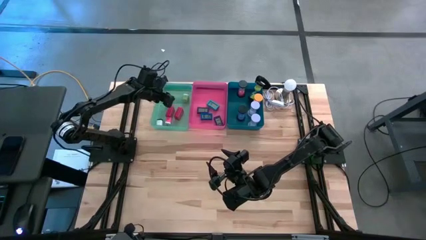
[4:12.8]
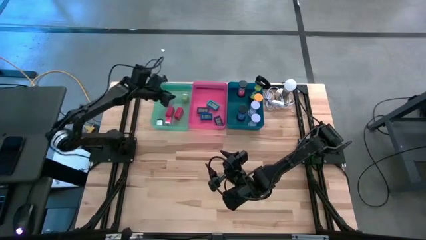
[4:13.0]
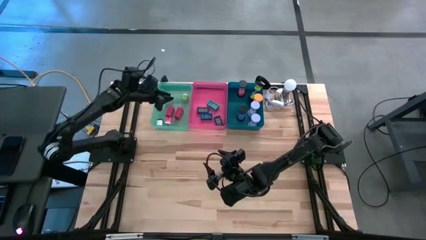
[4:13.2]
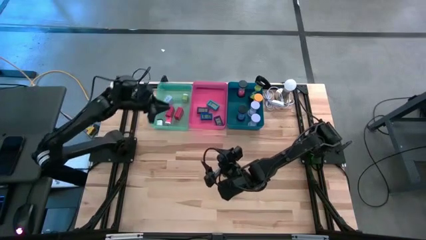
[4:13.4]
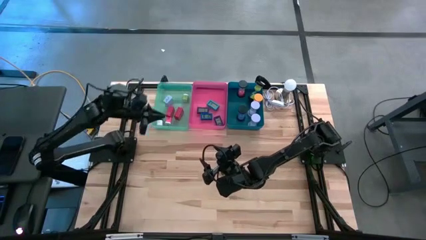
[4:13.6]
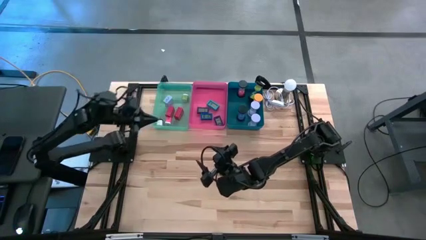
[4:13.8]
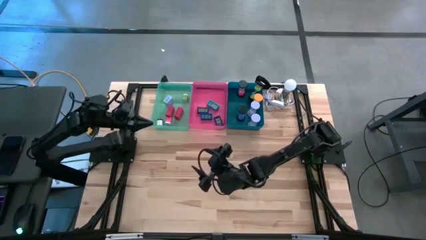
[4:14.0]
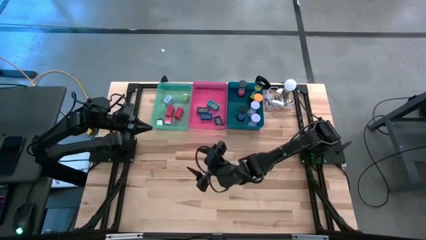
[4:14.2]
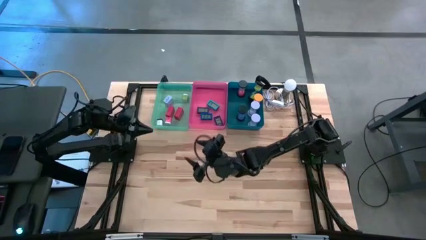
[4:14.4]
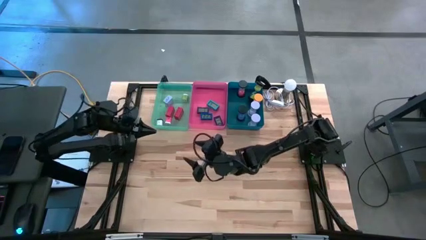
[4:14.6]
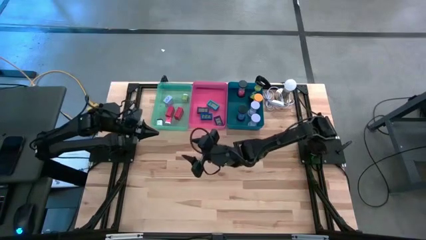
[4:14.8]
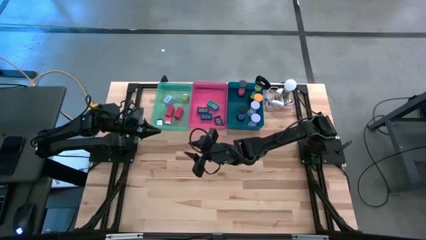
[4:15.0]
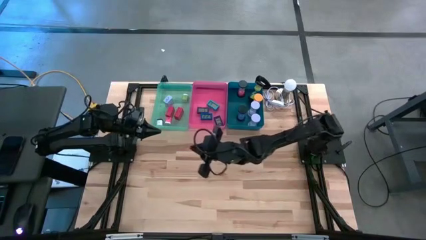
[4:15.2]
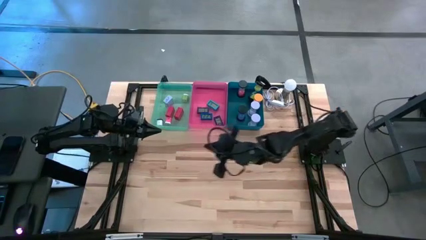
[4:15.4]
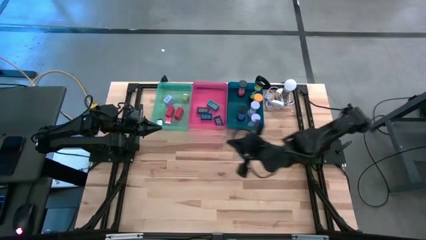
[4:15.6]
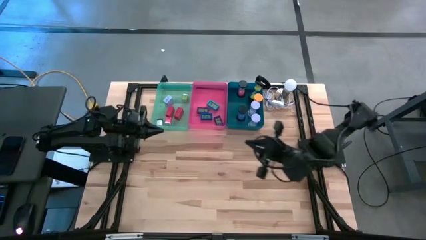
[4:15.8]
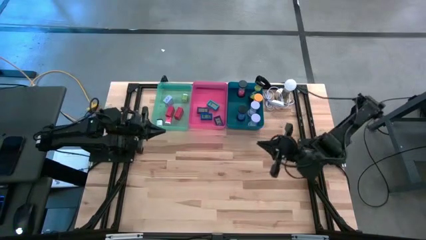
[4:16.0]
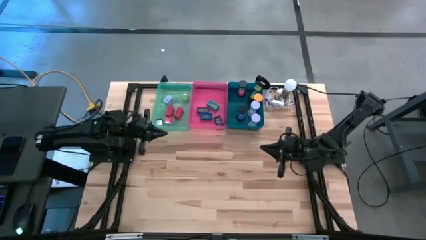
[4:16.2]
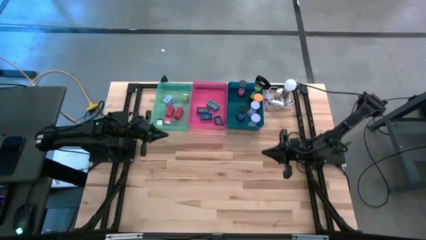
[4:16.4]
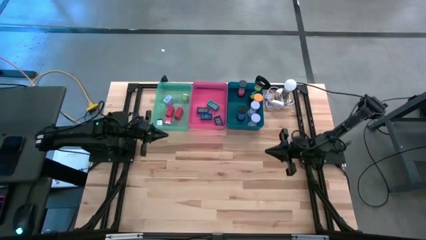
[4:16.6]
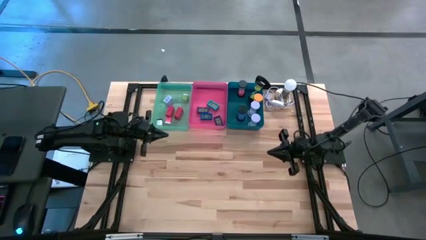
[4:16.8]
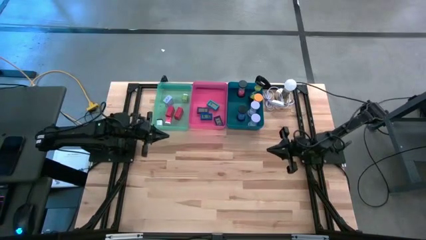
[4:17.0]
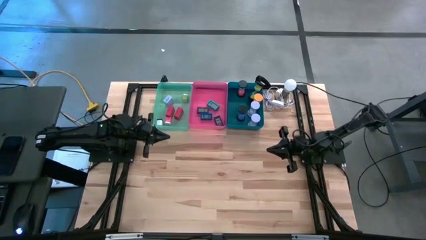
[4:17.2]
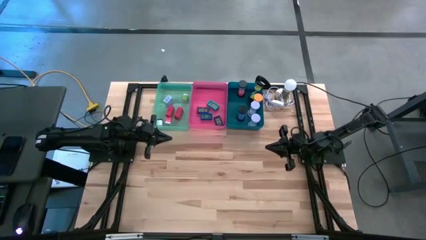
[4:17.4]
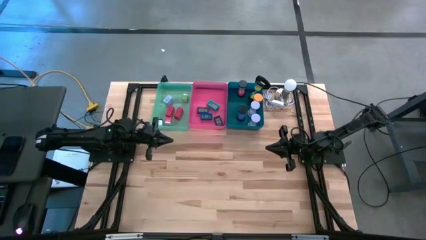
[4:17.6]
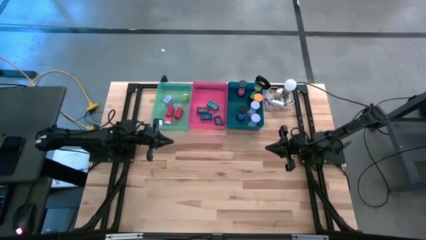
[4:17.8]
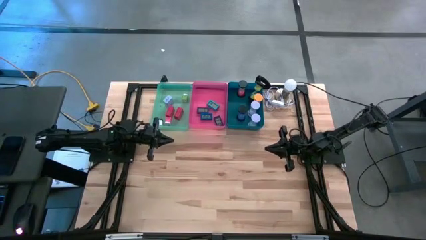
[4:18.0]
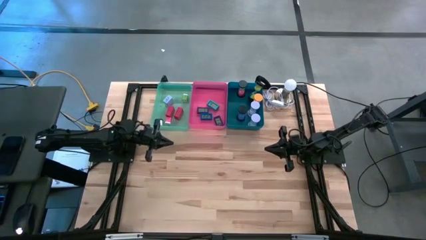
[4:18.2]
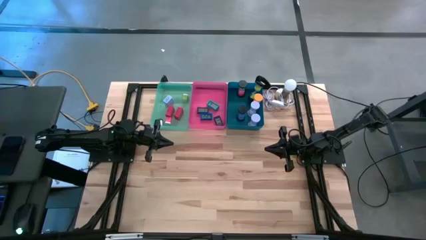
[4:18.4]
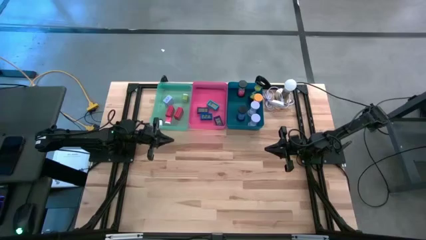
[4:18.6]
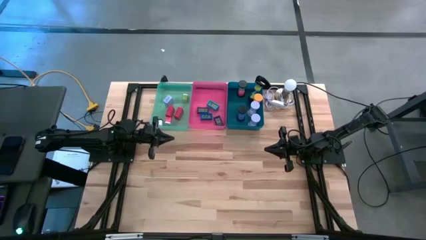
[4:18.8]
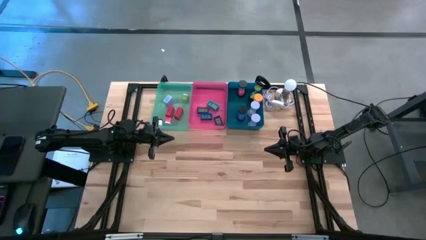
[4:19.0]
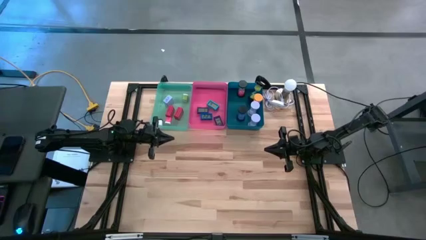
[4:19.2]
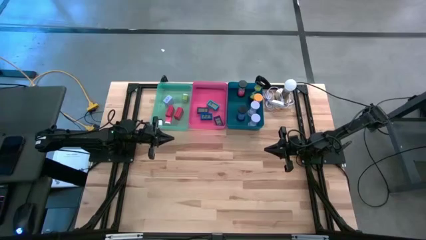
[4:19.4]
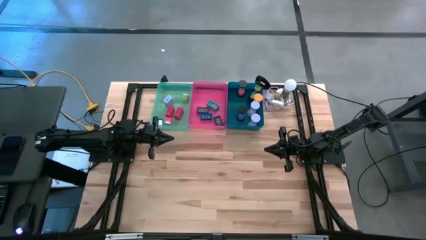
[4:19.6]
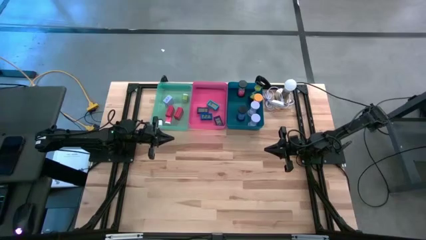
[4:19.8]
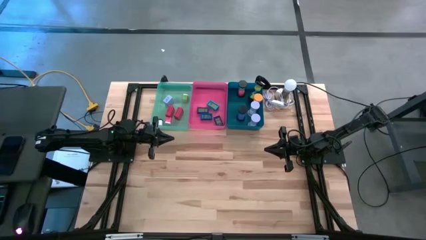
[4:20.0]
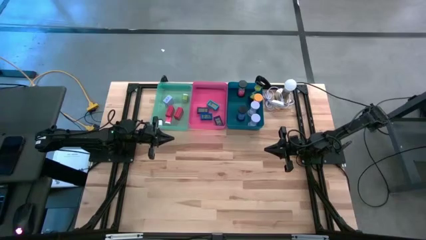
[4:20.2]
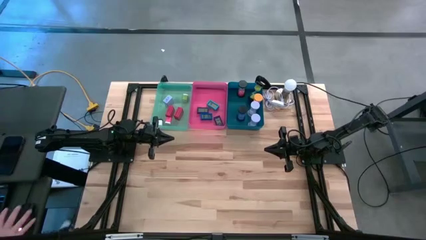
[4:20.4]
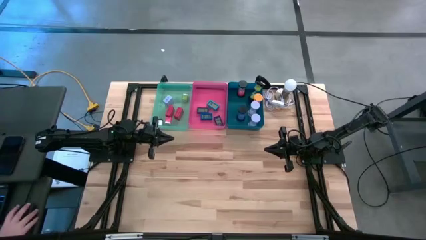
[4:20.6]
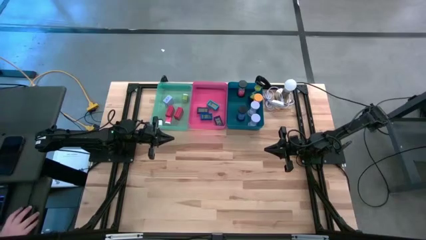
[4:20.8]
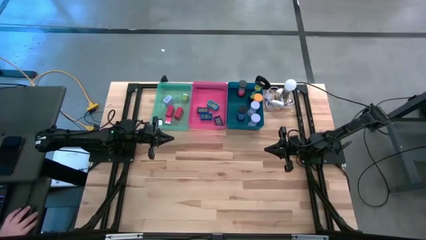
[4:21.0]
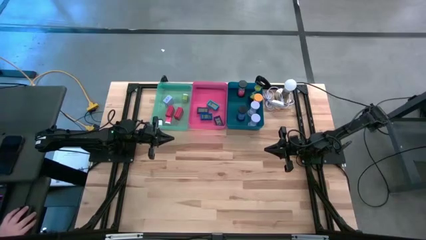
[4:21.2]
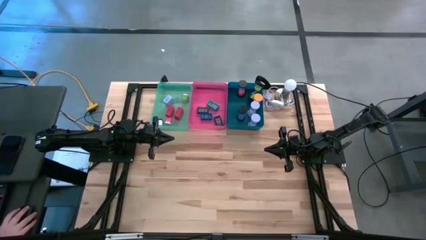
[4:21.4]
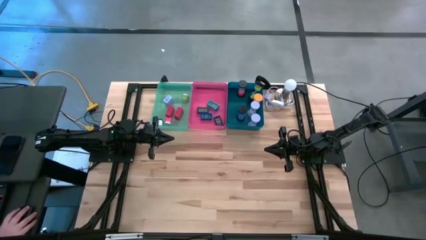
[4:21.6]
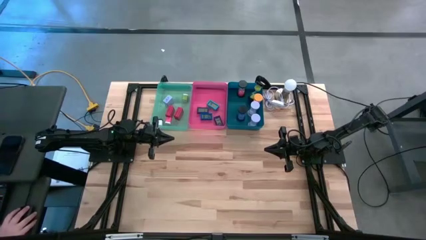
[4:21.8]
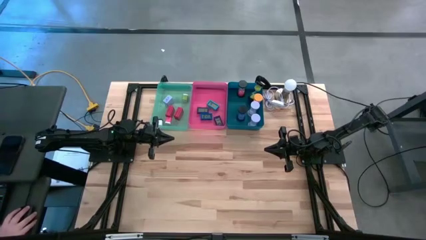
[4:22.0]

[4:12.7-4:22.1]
Task: Pick & Place Office items
Return to Home Position

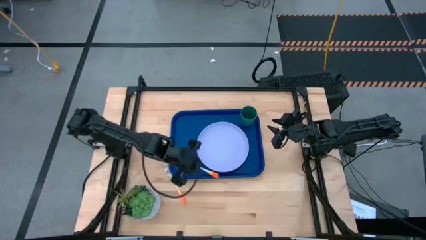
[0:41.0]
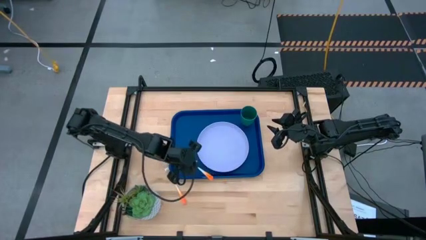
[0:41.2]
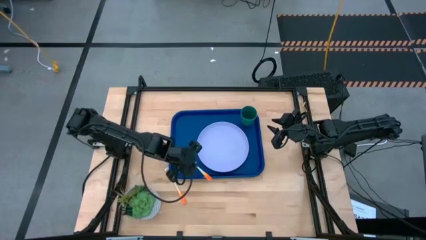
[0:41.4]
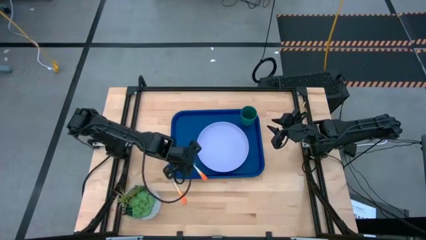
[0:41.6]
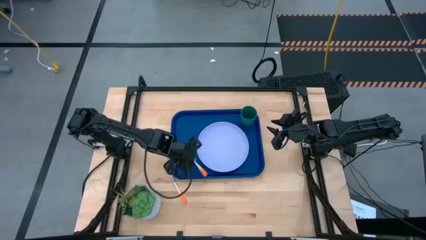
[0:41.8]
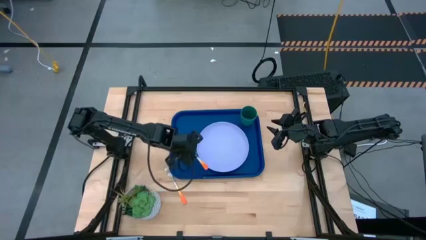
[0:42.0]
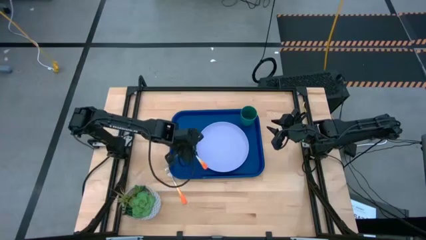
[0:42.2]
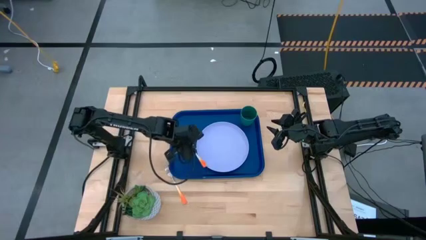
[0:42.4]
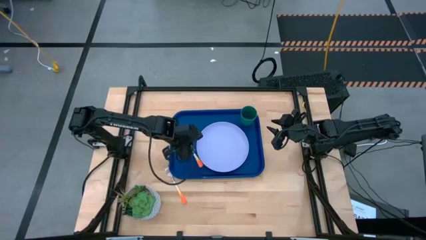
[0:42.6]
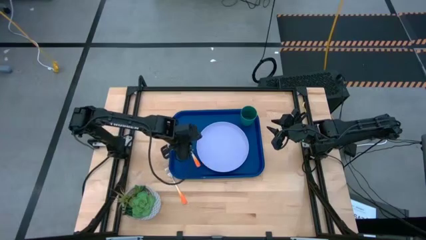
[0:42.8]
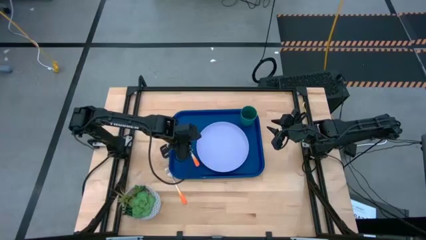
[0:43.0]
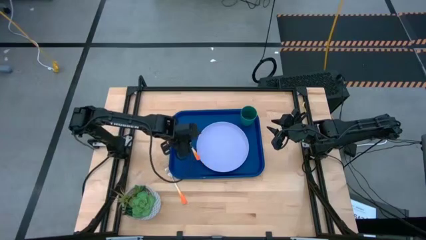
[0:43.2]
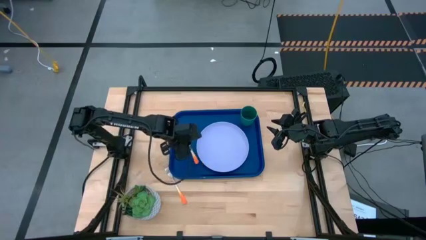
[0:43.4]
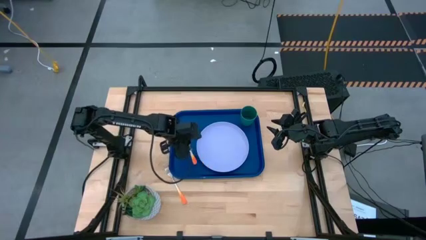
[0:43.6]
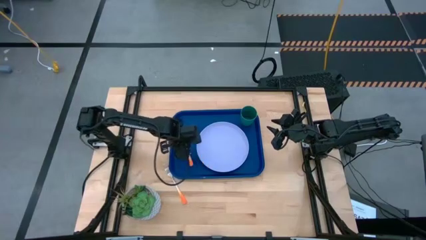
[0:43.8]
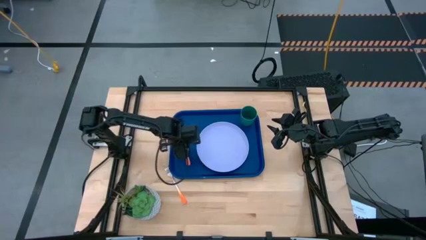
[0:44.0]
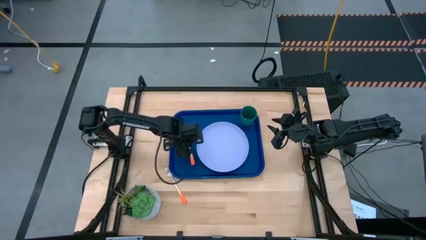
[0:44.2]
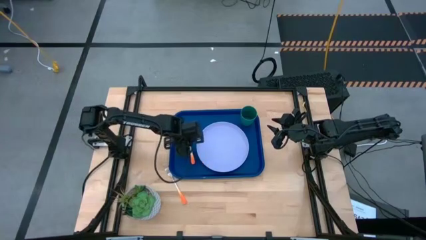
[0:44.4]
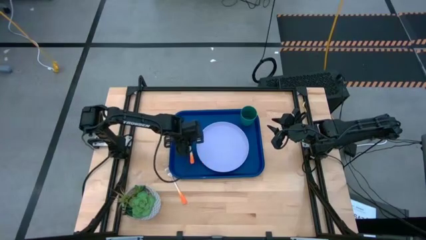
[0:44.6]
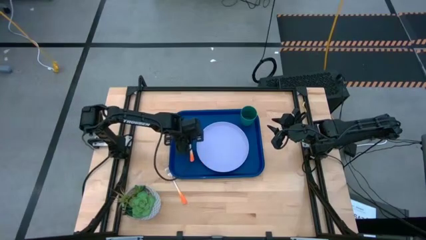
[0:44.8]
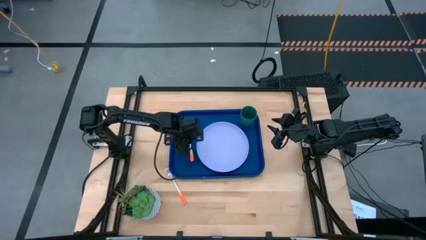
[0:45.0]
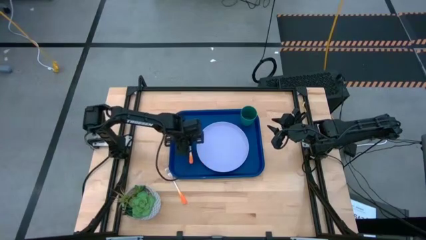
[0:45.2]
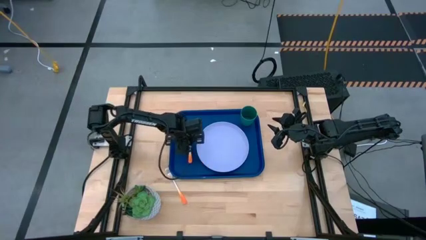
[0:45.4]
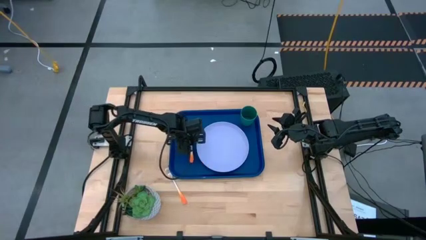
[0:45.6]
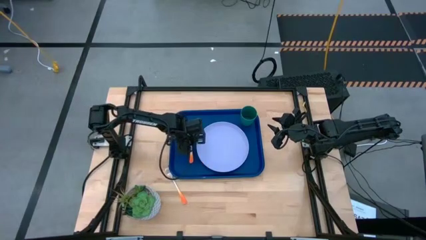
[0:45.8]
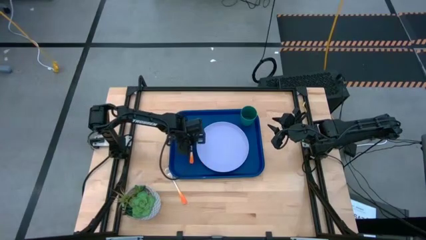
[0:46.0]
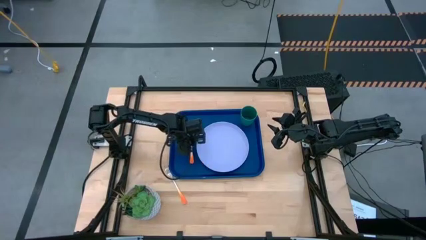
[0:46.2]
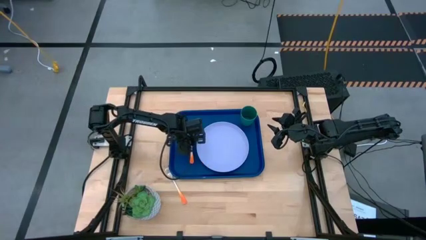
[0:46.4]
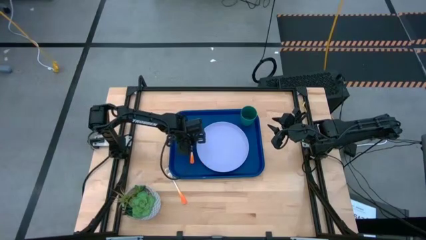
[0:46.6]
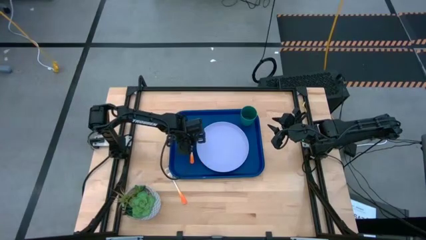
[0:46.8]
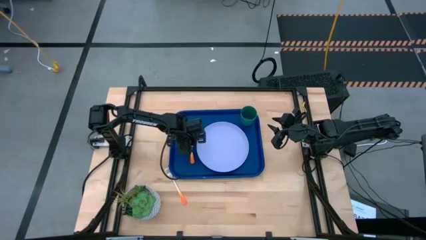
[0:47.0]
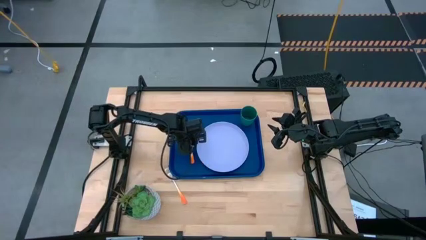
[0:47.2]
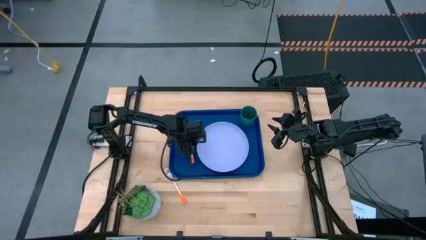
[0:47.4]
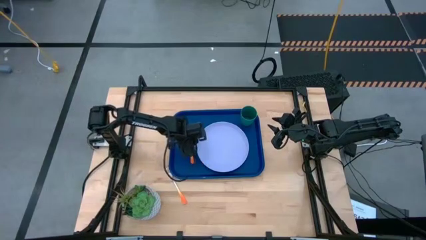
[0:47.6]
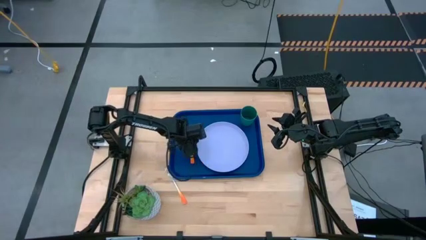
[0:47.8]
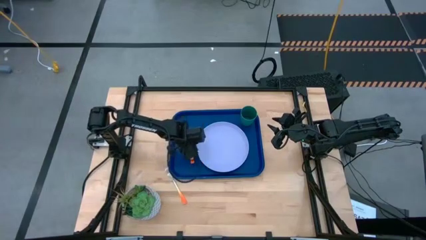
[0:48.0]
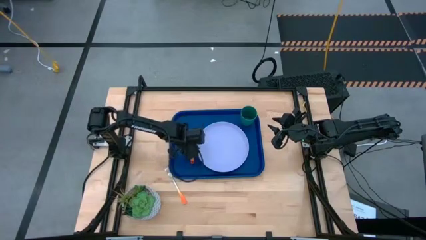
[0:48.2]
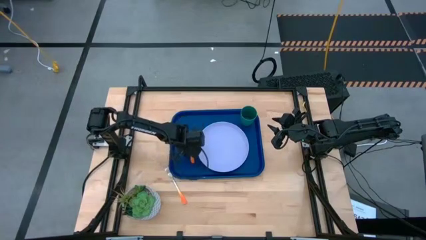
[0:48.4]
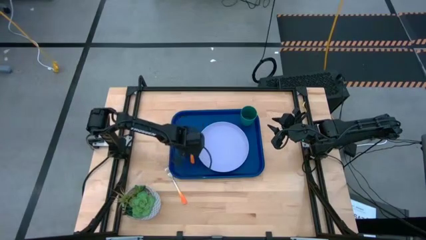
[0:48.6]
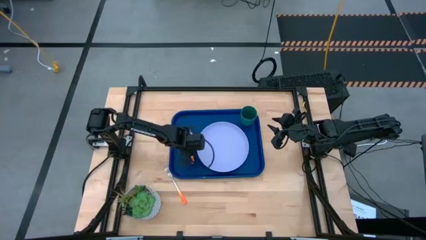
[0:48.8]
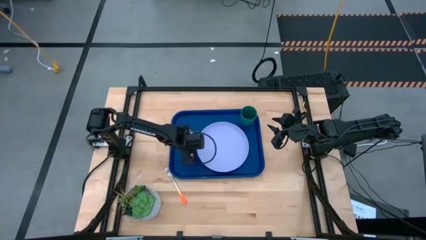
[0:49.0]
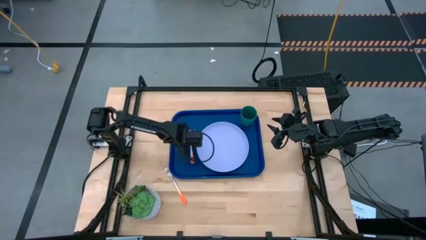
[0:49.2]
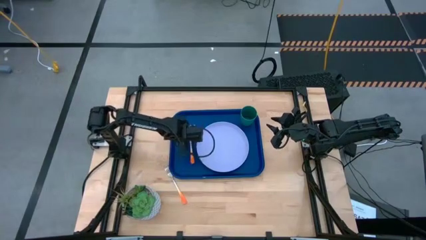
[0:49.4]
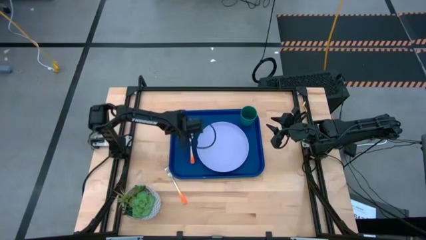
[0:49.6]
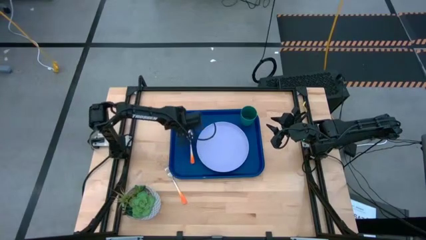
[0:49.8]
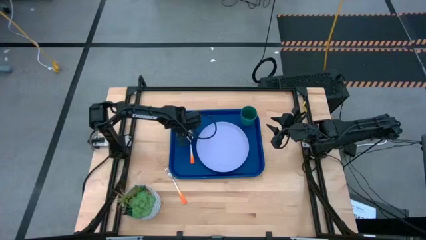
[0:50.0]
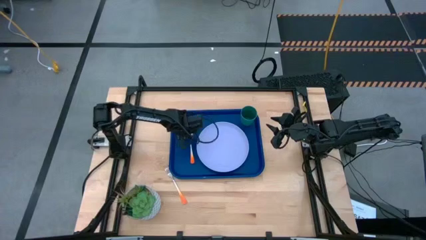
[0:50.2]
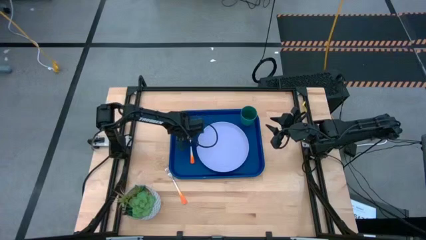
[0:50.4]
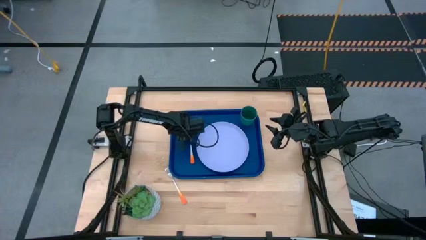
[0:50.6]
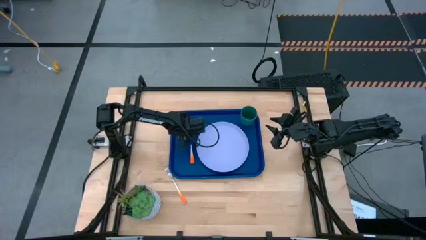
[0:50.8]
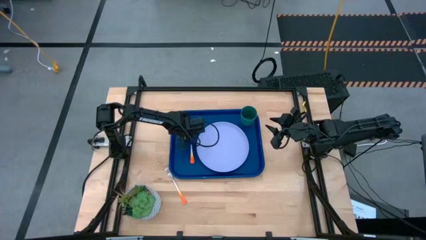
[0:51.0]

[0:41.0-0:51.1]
Task: Pick and place plate/cup/fork/spoon on tray
Put the orange spoon to the left of the blue plate on the blue serving tray
